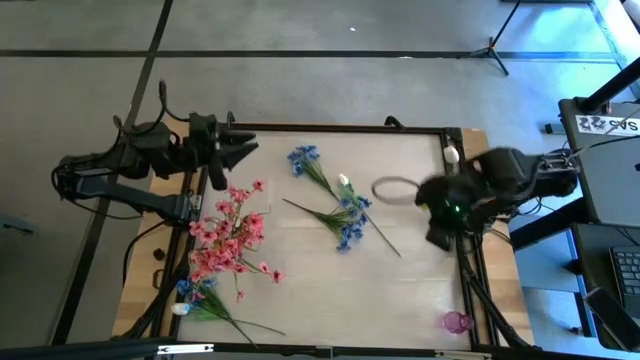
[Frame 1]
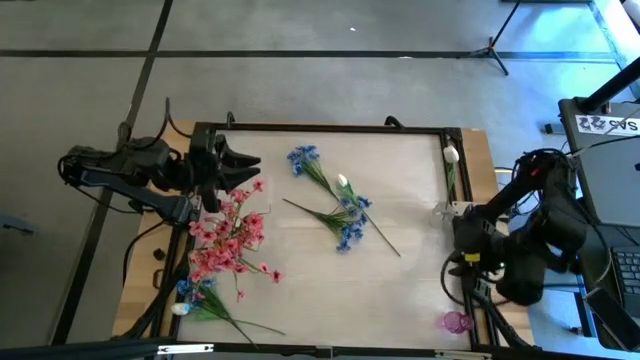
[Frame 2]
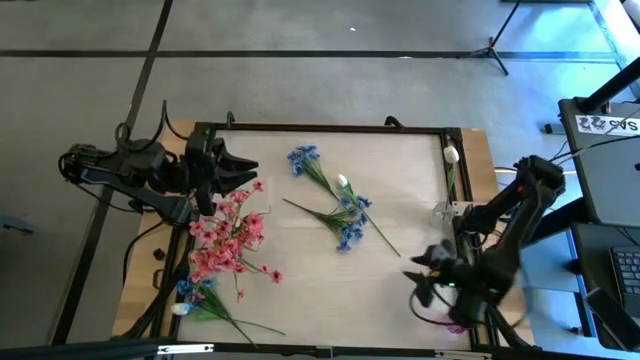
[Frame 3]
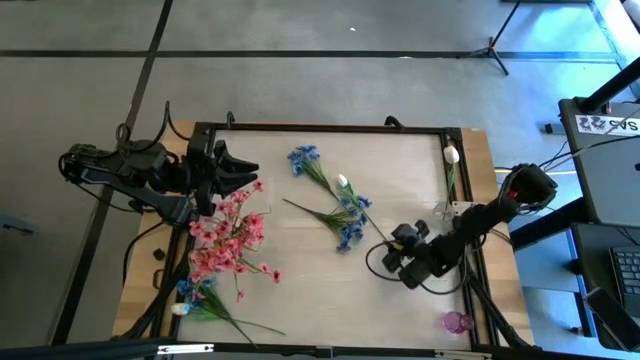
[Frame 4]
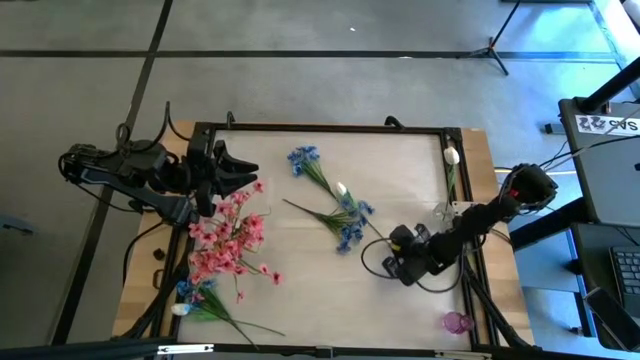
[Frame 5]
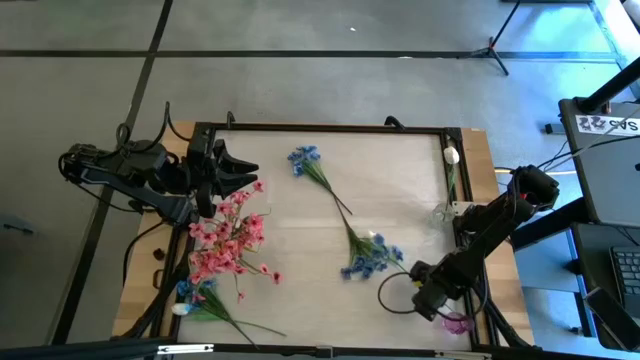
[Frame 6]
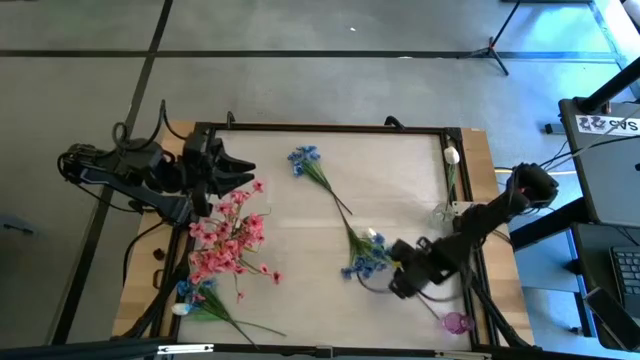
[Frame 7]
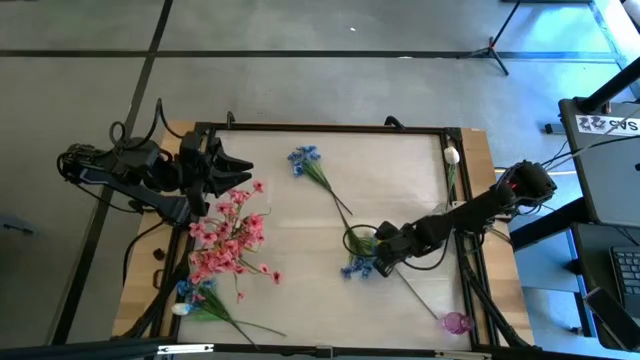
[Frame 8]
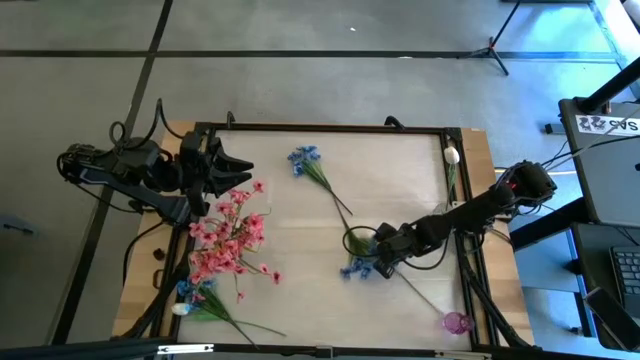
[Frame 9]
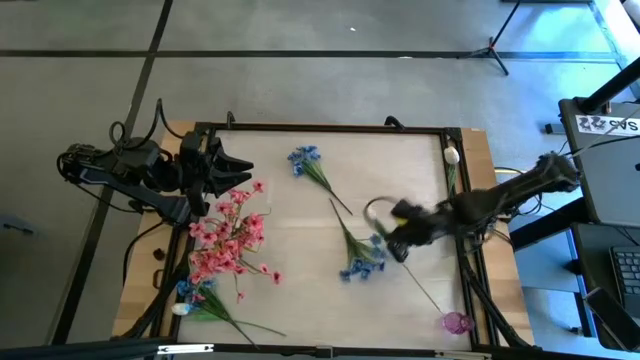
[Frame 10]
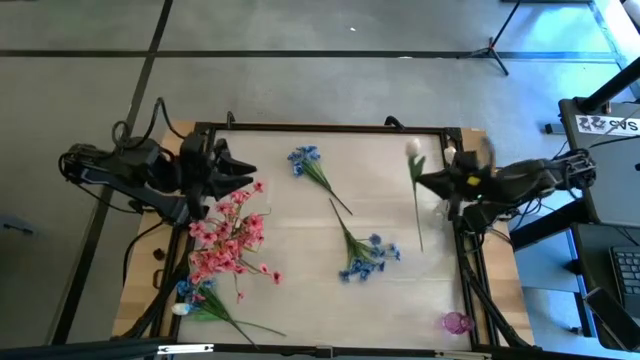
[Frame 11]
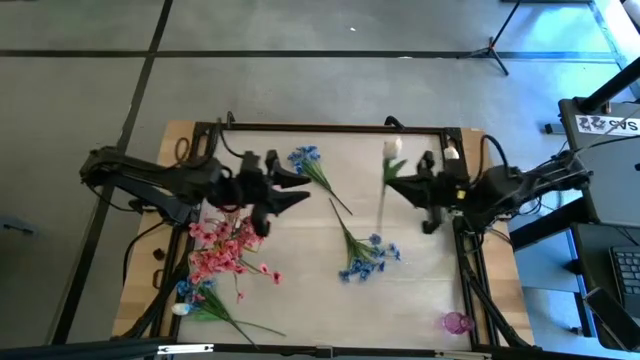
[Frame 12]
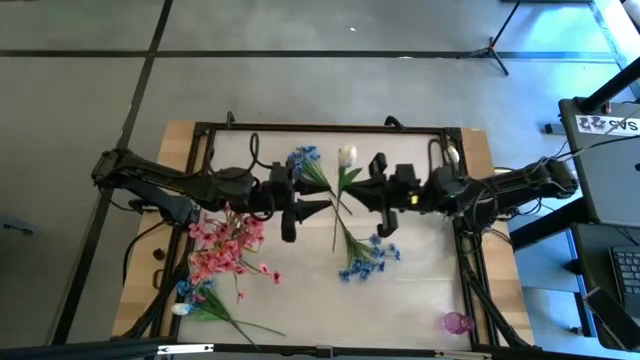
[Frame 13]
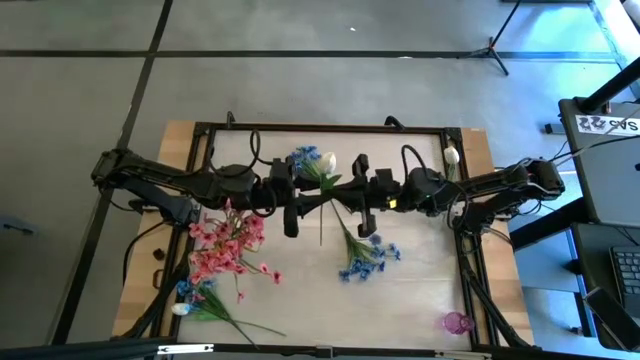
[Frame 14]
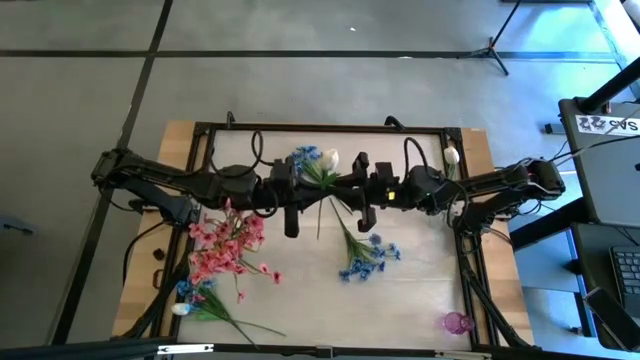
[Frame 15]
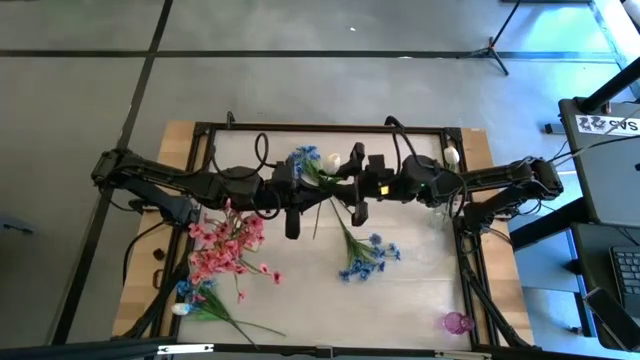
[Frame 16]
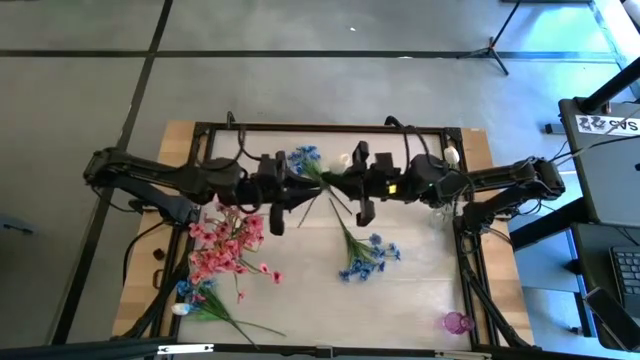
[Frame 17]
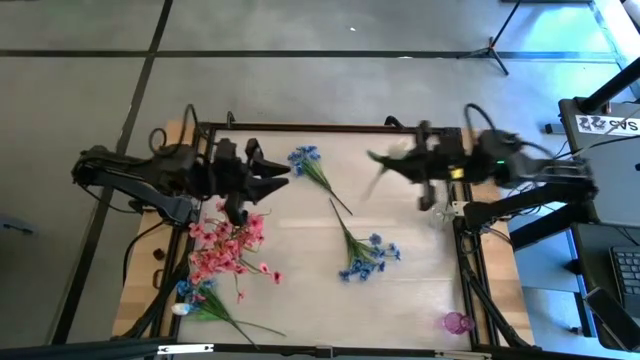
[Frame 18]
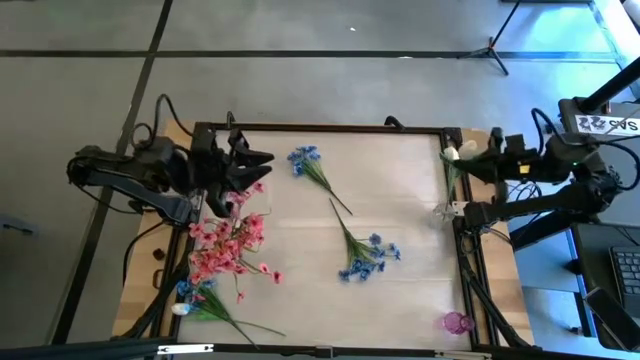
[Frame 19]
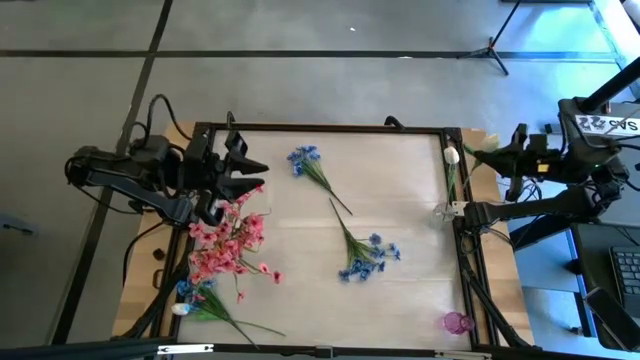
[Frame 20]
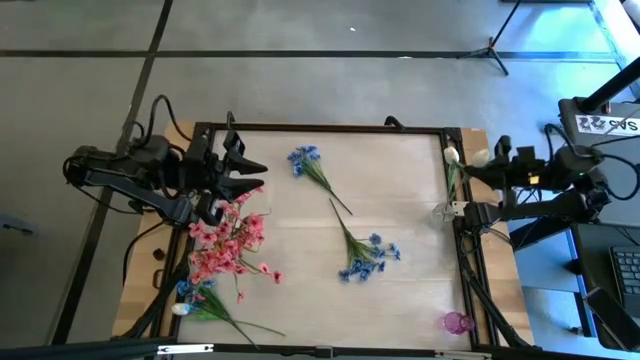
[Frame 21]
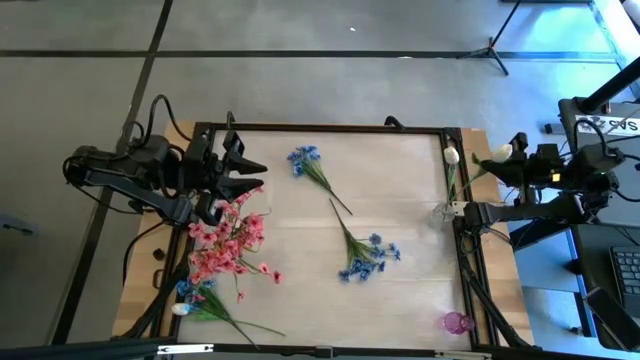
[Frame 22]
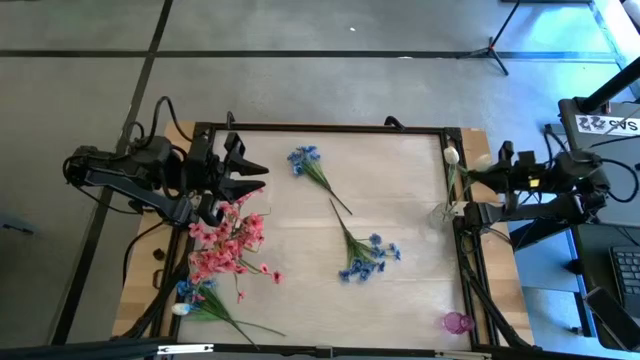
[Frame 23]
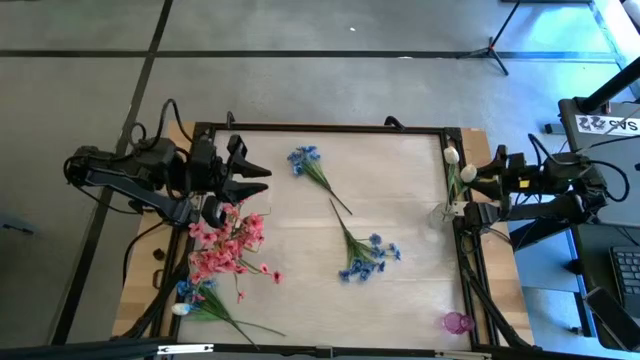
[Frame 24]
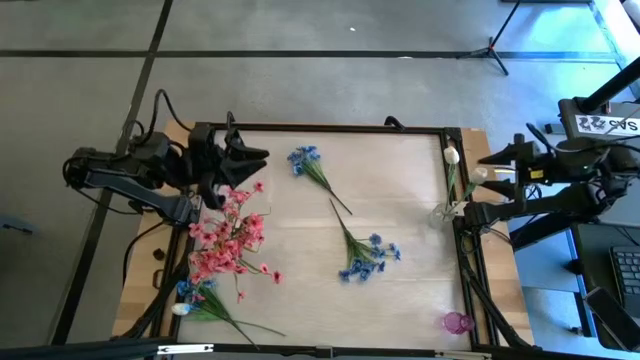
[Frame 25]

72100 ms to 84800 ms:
Task: Sort flowers into vase by color
Put the top white tulip into the transparent vase

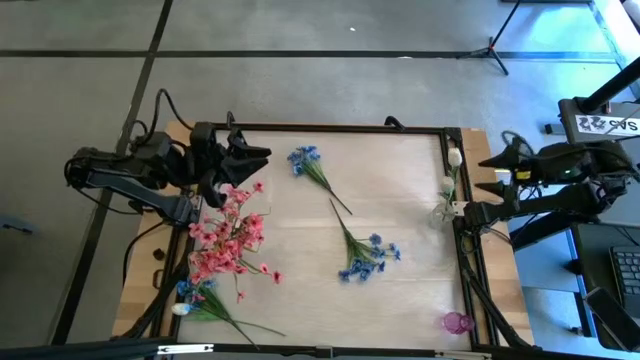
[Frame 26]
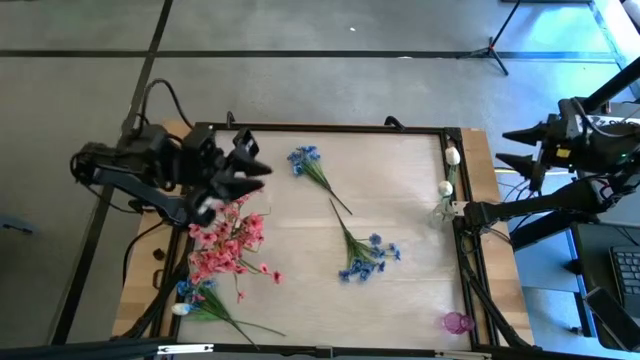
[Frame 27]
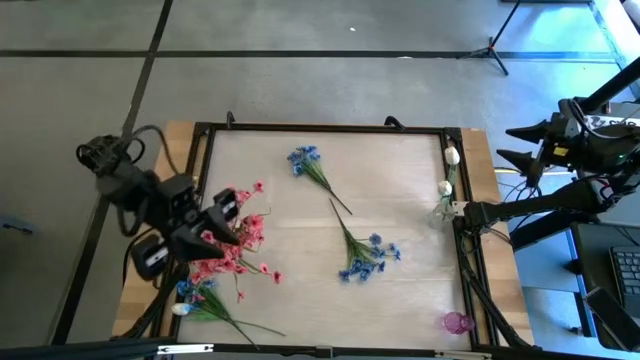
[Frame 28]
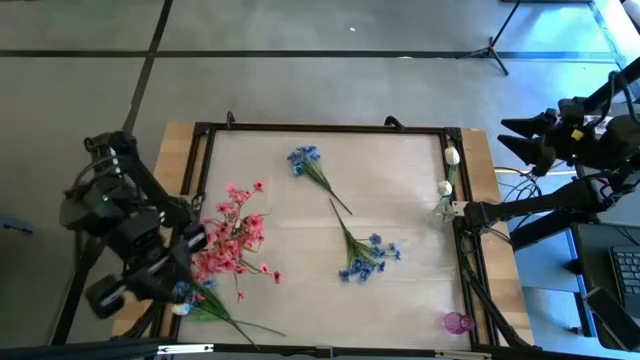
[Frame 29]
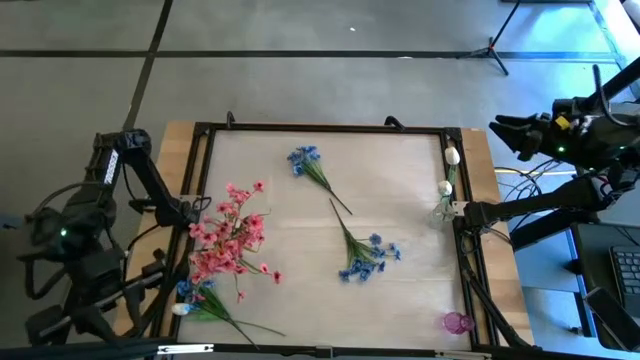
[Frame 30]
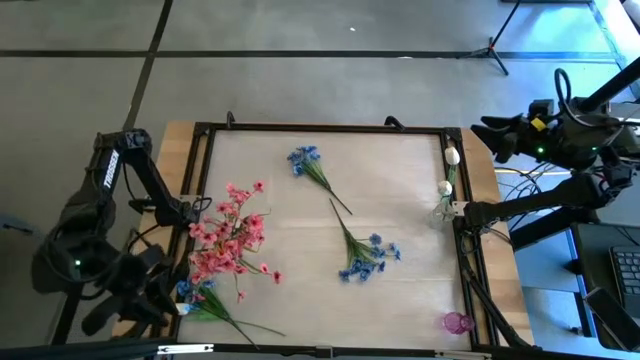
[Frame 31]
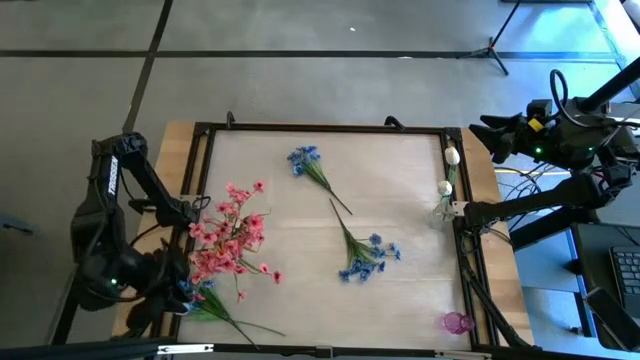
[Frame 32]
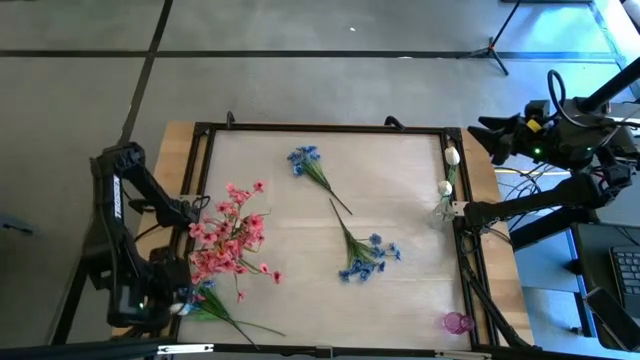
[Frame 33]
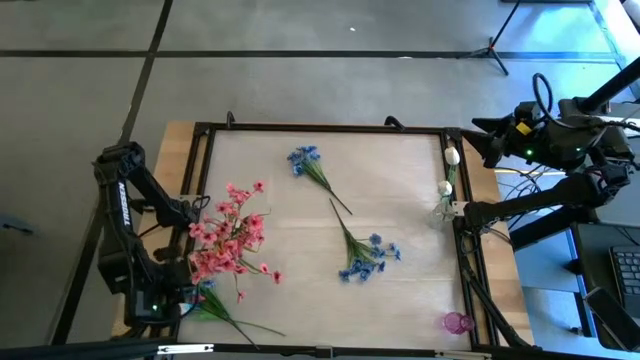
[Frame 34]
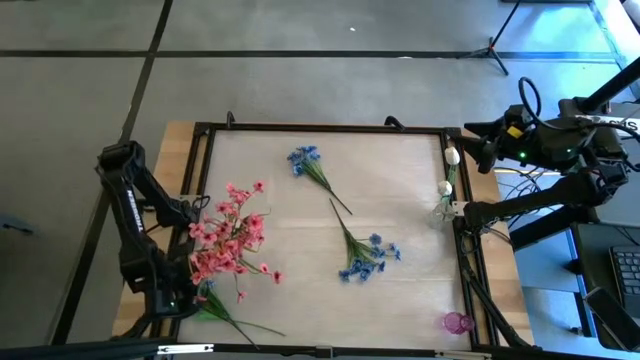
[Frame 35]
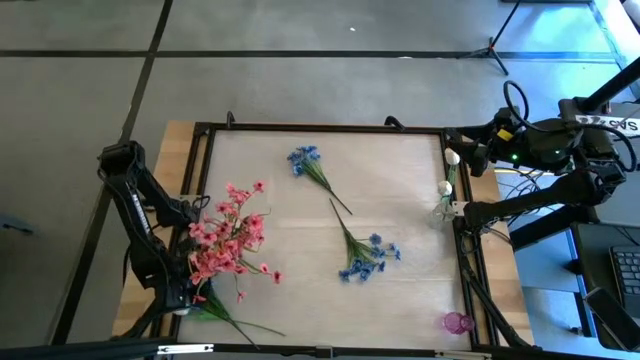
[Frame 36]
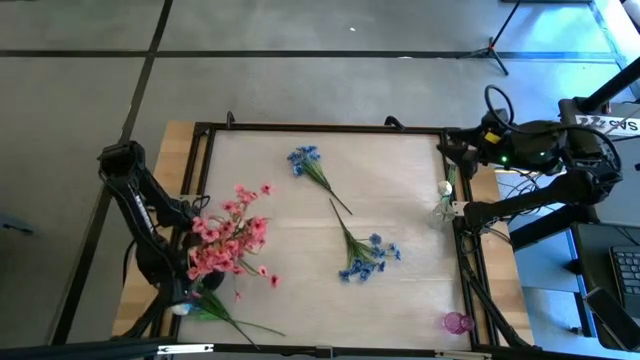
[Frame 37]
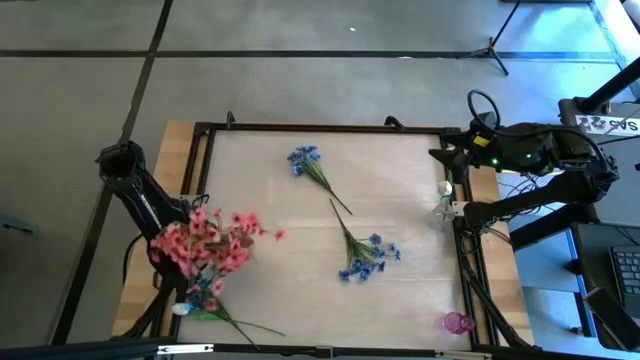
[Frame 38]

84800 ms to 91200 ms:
Adjust the red vase on the table

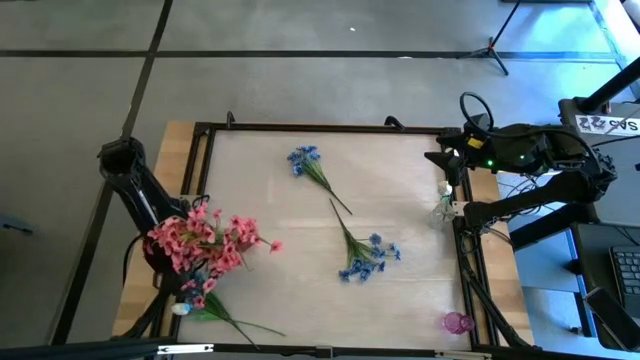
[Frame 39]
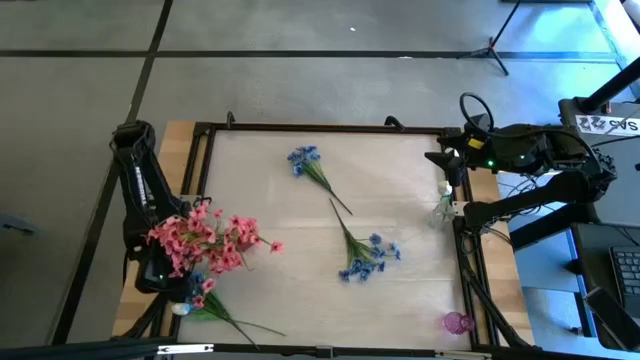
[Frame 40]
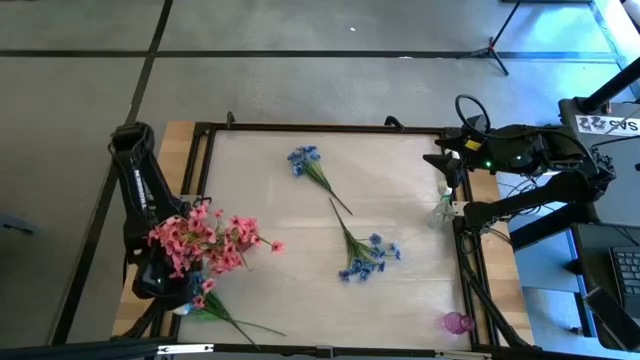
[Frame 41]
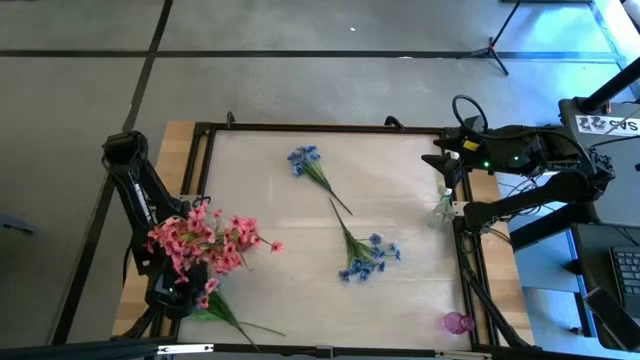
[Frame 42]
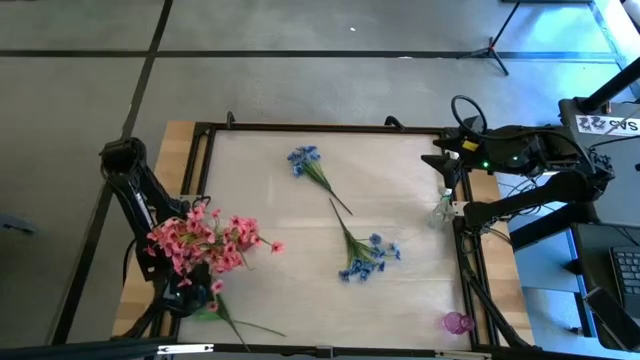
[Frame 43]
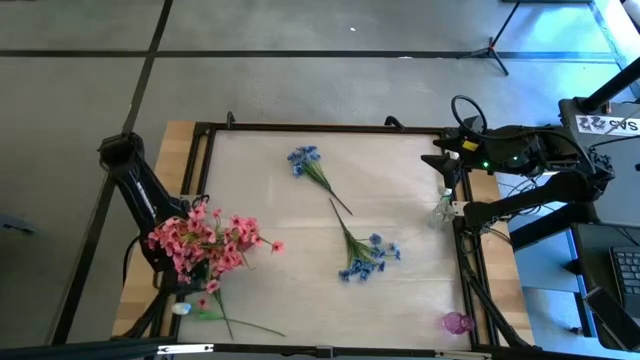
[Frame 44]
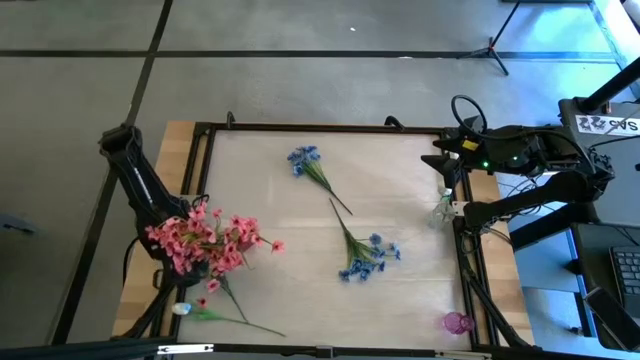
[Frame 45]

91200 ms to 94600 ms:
Adjust the blue flowers on the table
